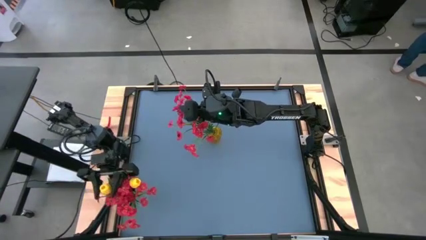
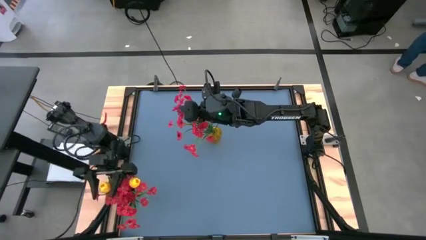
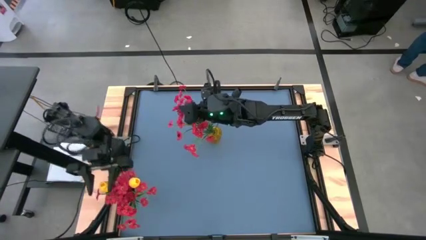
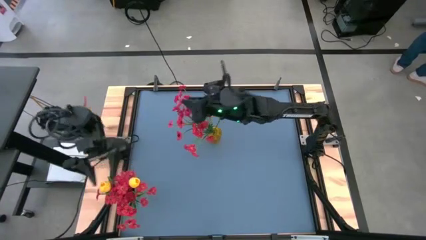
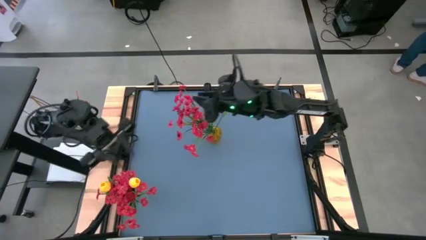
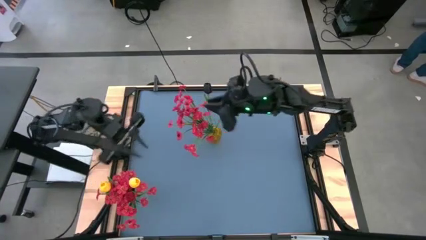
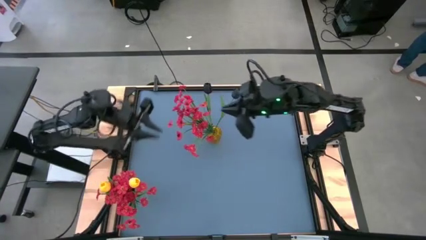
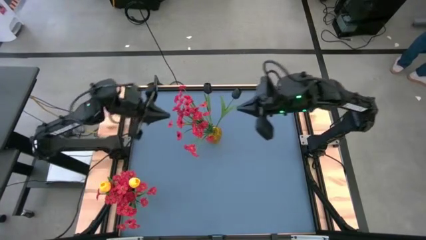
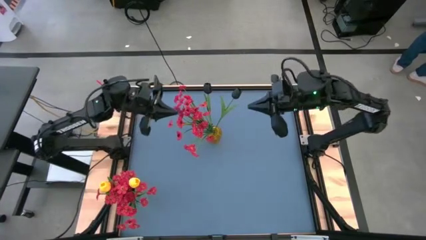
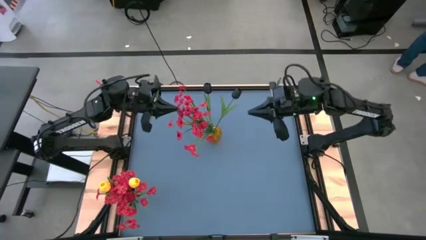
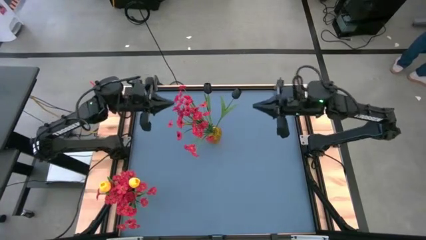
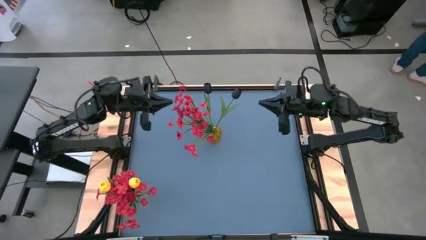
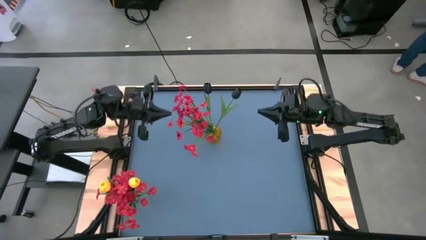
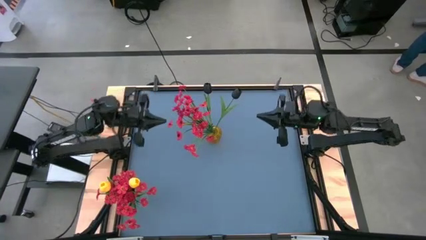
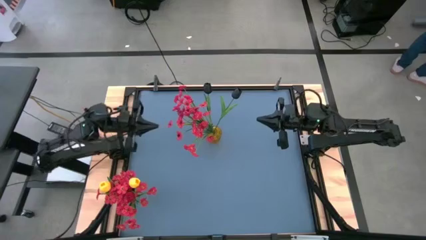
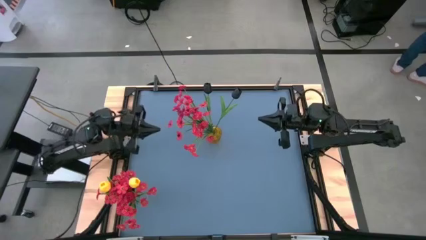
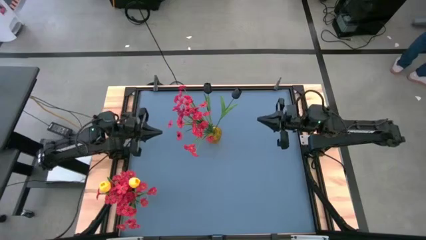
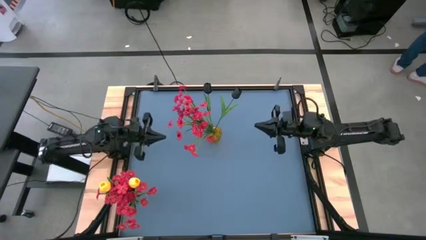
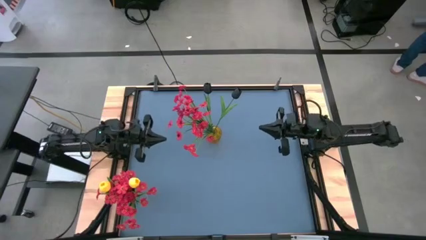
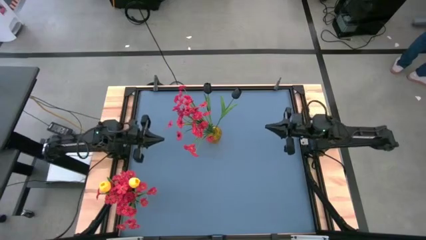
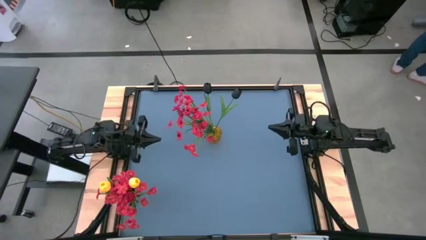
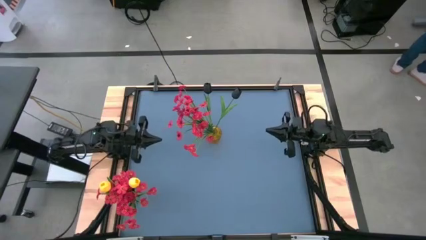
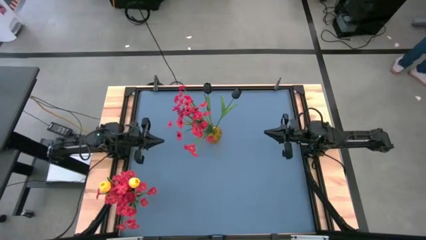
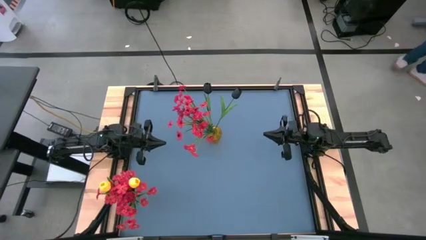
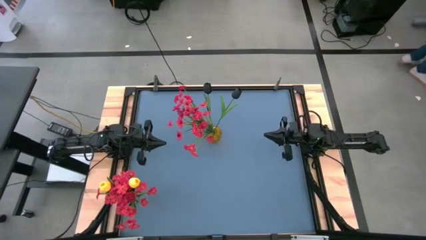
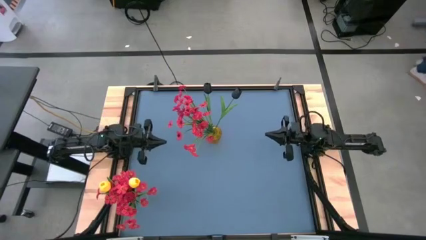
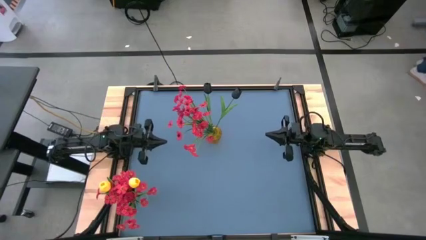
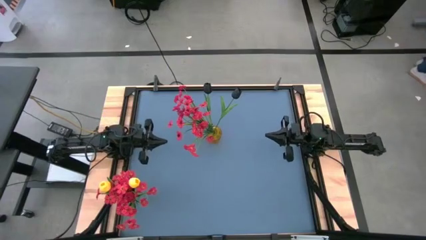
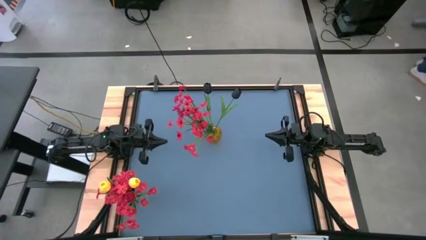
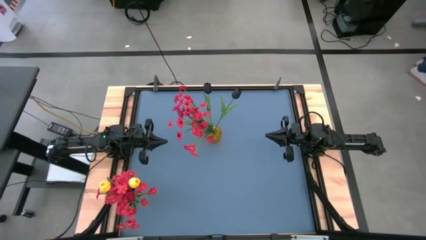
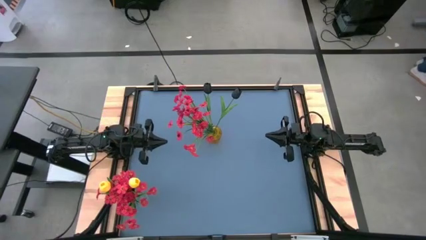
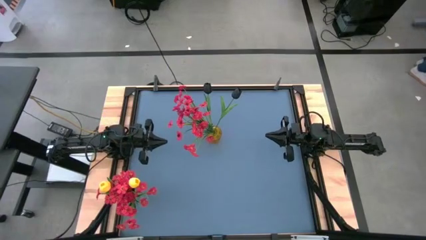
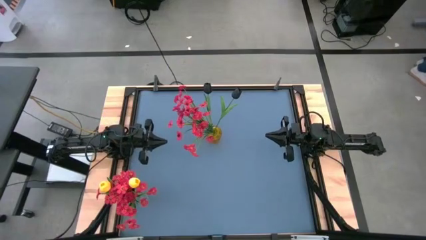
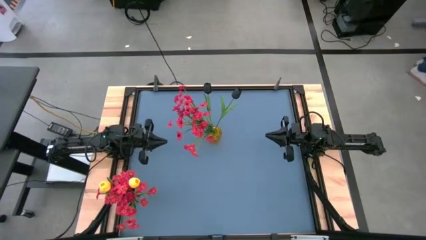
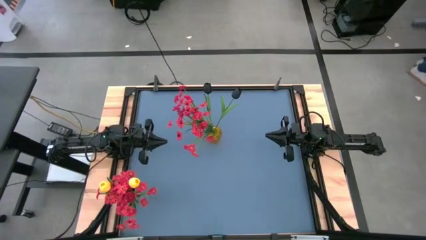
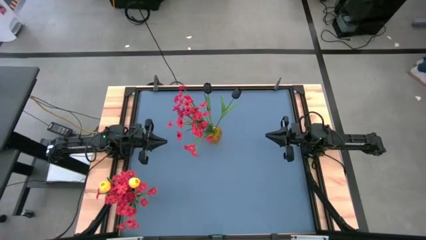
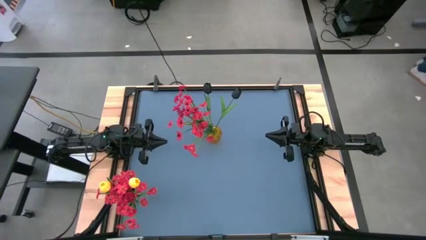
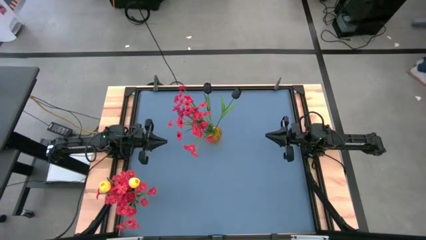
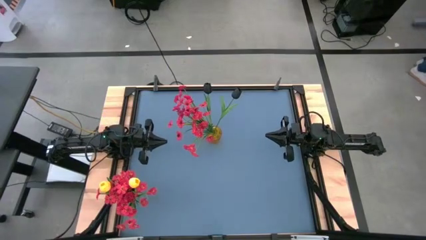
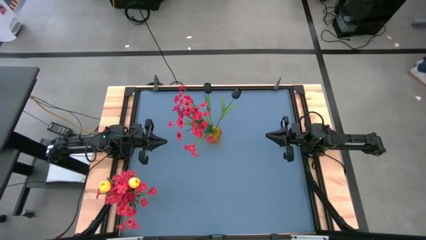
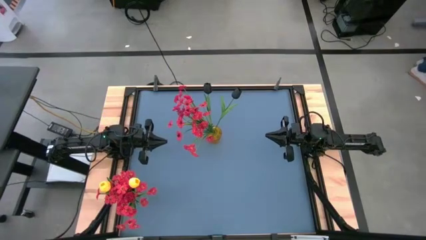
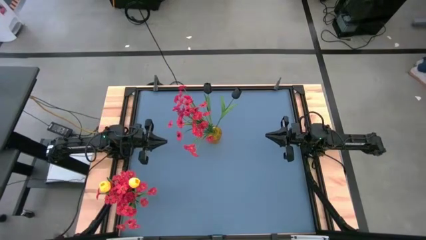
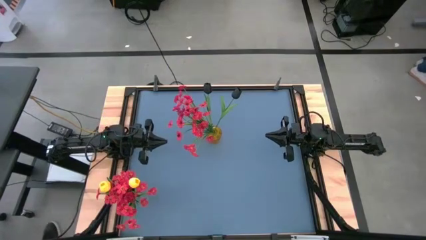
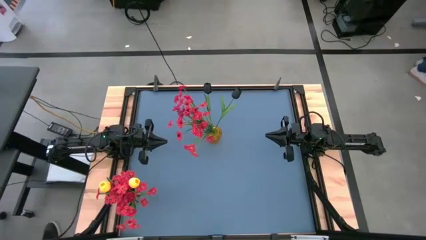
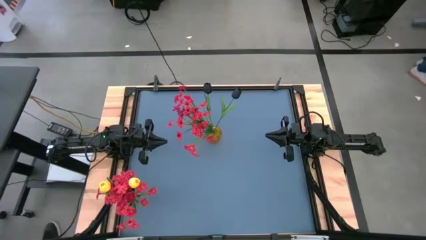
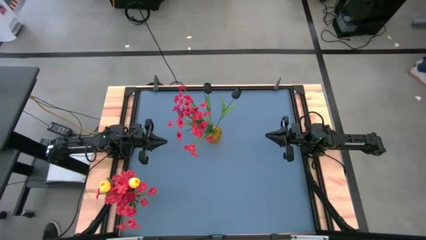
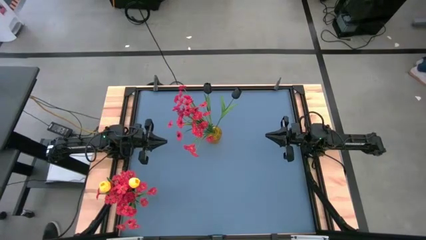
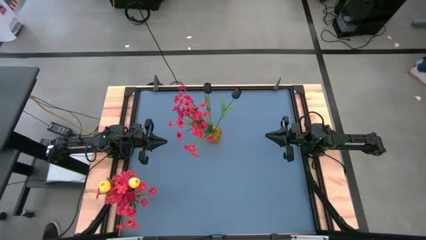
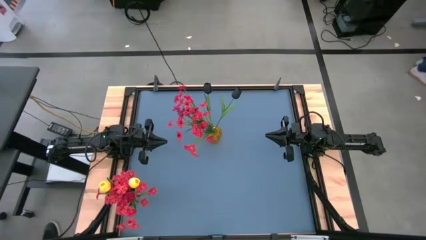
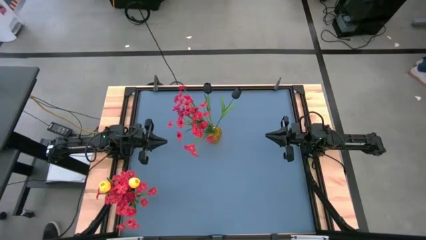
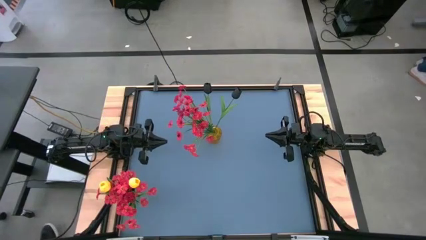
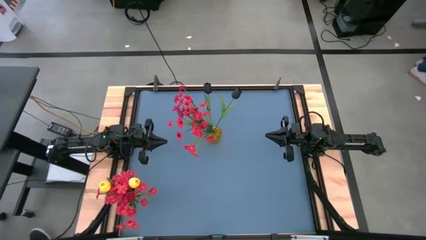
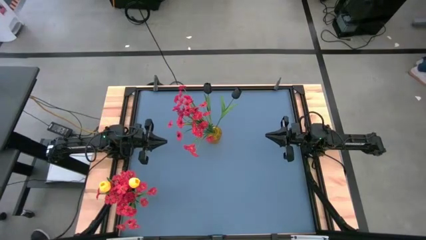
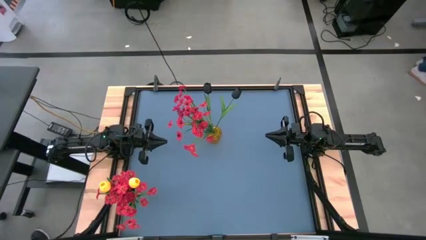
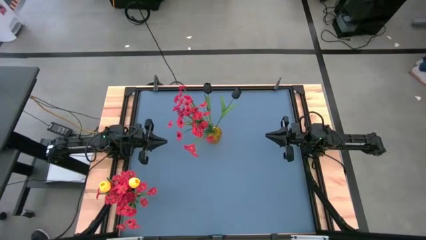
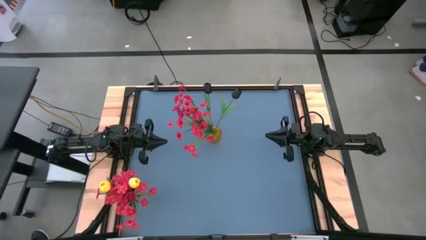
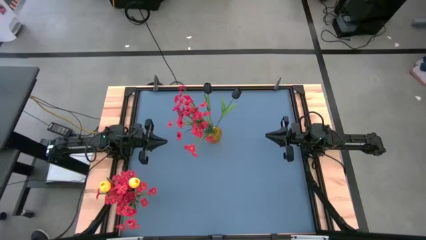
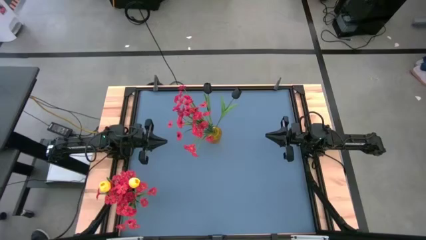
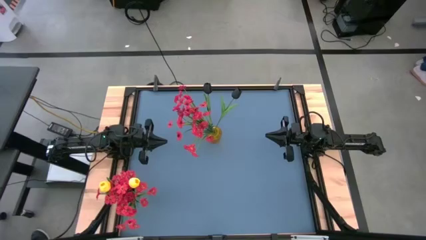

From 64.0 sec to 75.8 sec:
Task: Sort flowers into vase by color
Return to Home Position

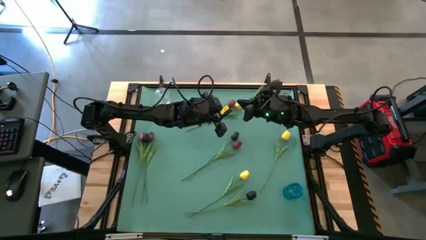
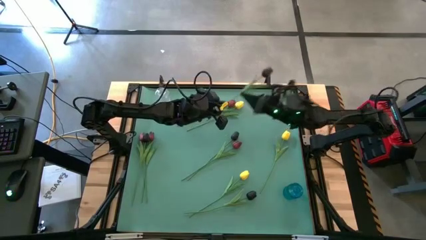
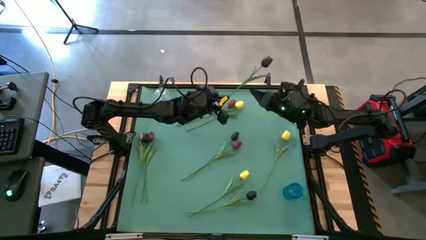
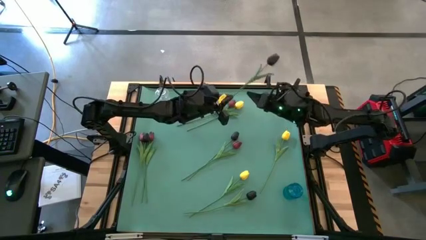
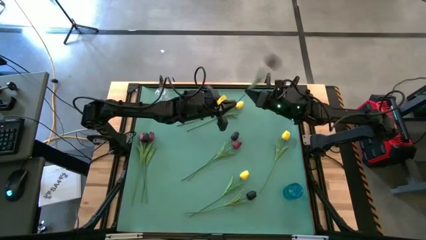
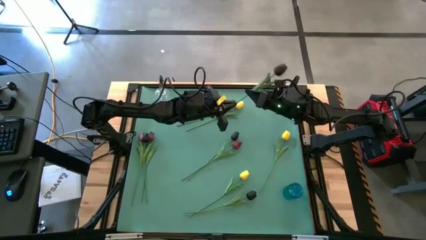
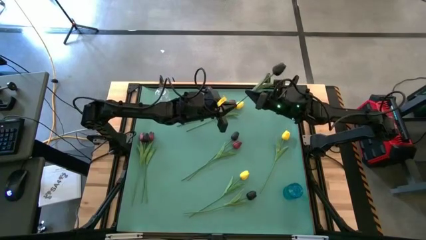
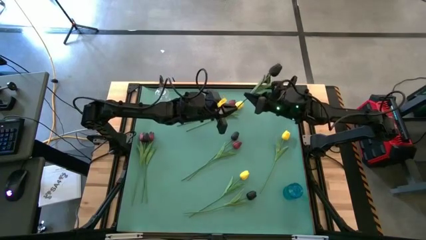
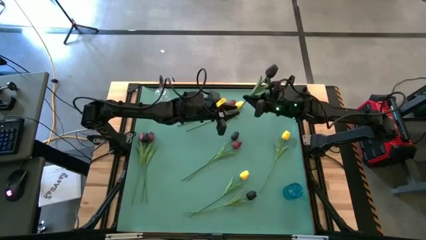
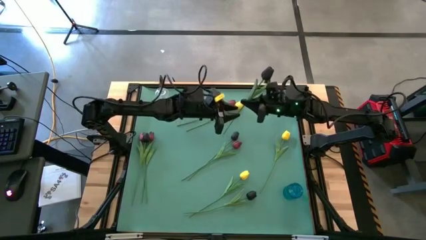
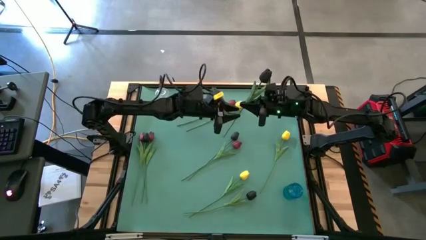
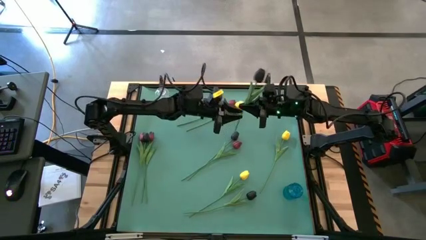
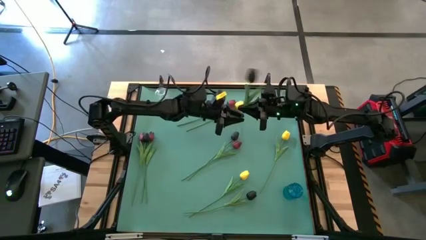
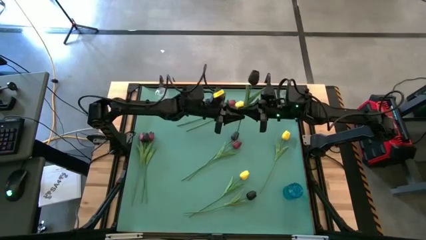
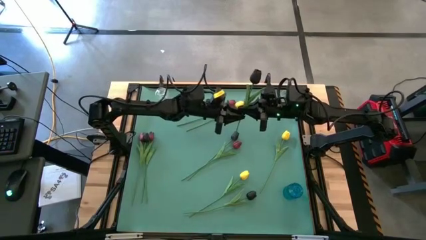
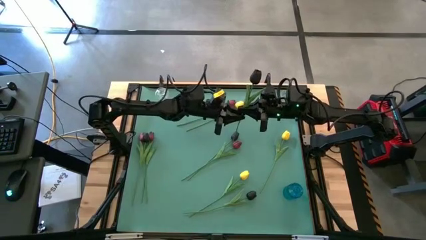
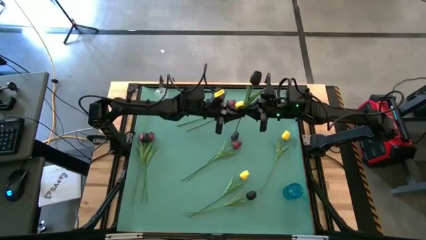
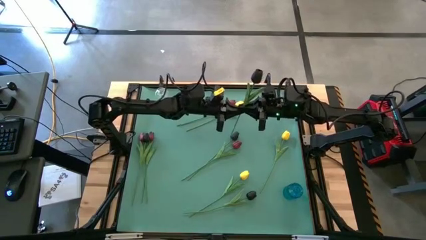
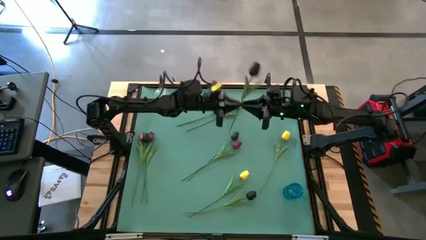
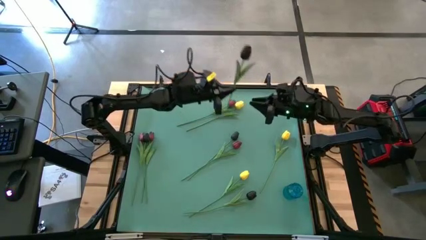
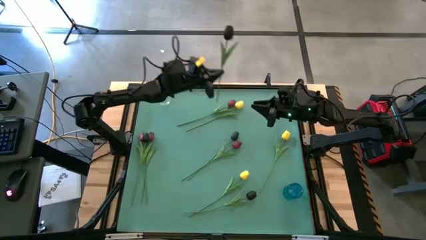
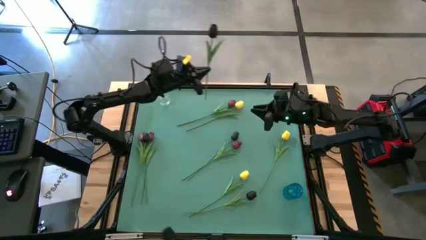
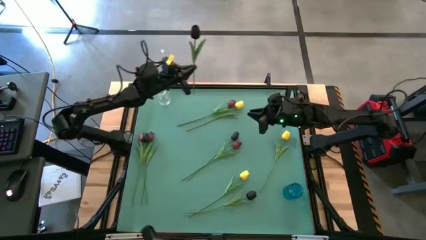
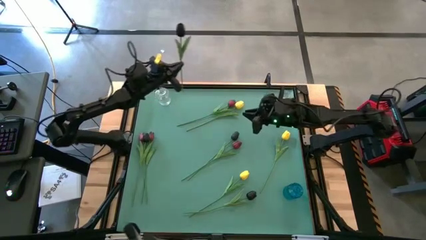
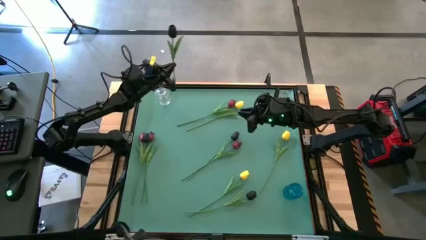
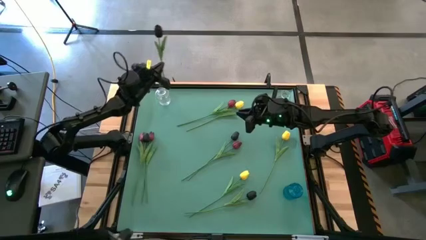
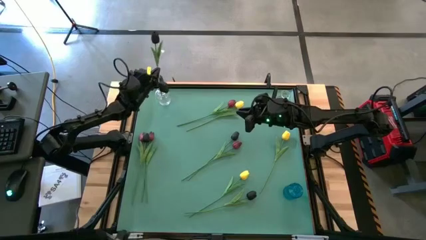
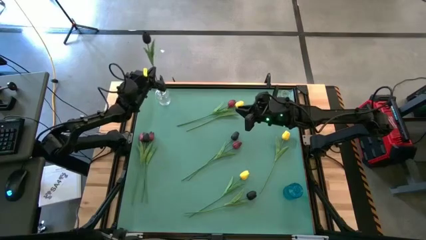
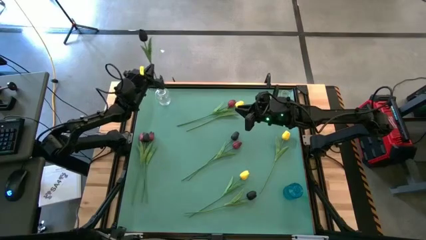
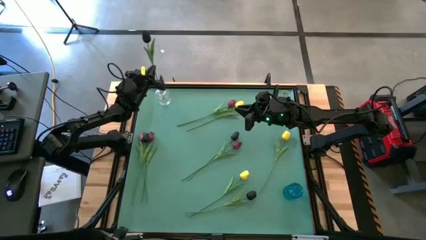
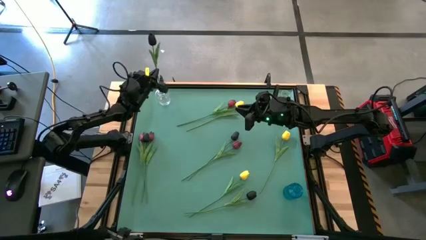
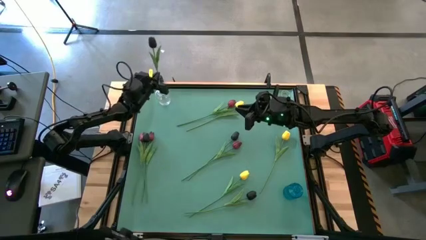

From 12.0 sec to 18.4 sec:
Task: Sort flowers into vase by color
Put the black flower into the left transparent vase
